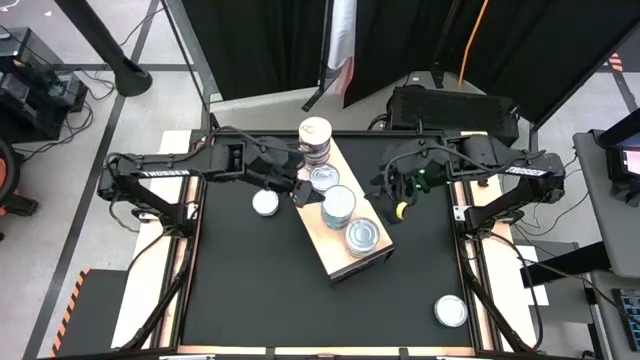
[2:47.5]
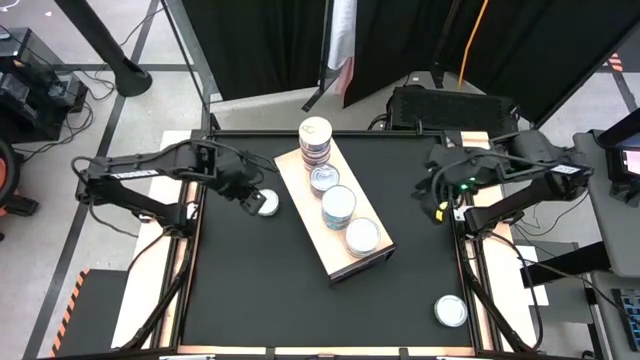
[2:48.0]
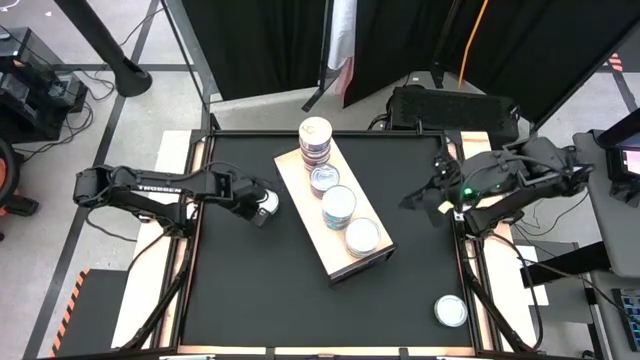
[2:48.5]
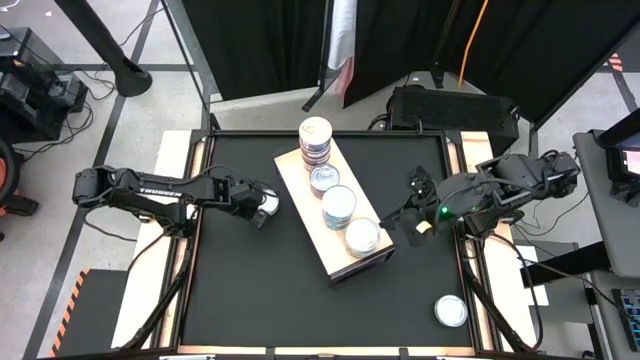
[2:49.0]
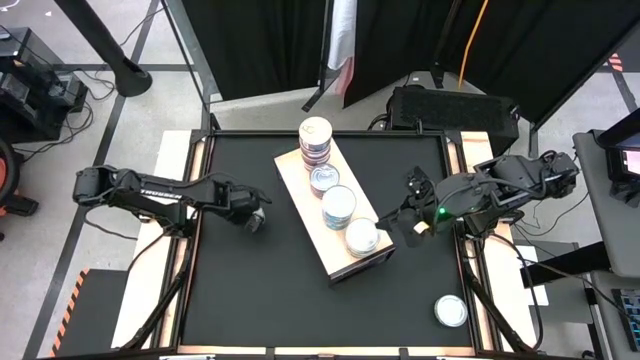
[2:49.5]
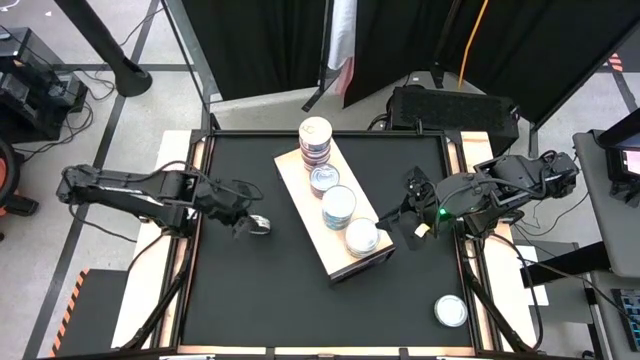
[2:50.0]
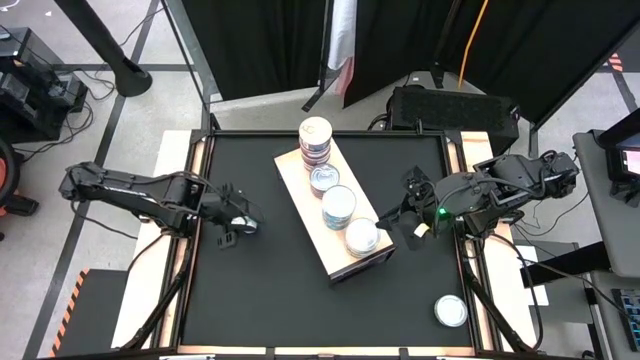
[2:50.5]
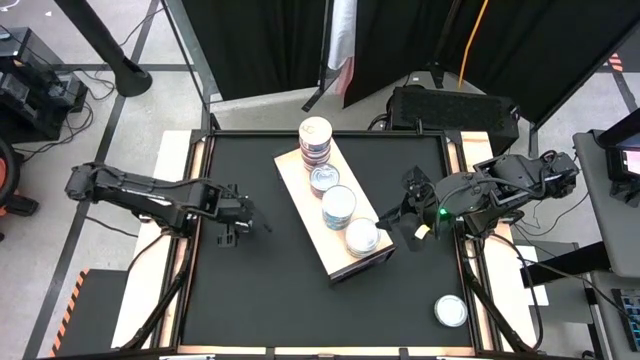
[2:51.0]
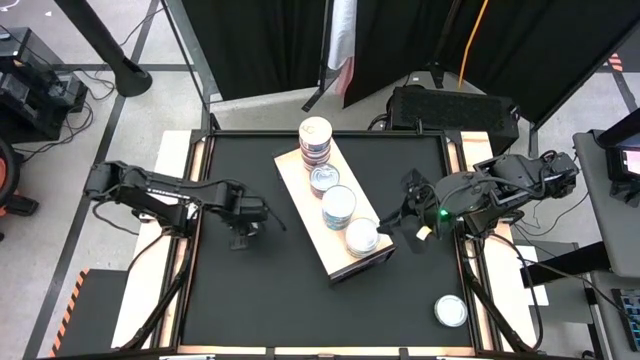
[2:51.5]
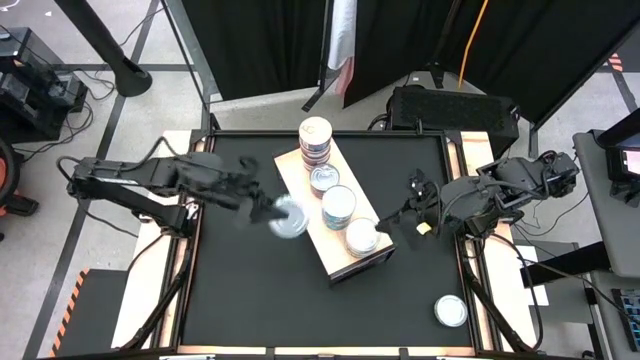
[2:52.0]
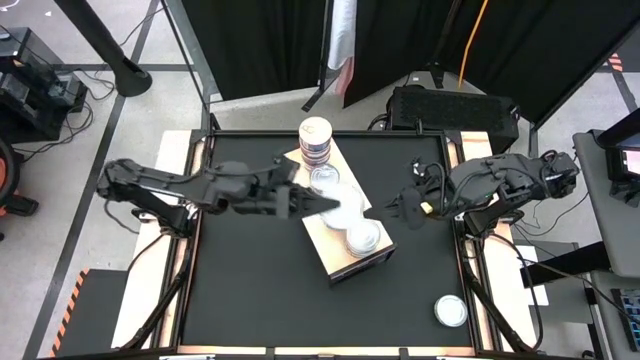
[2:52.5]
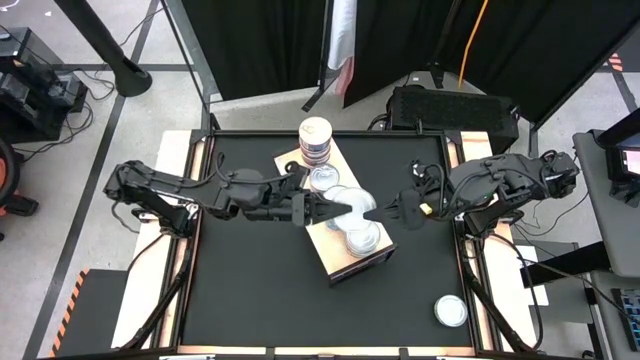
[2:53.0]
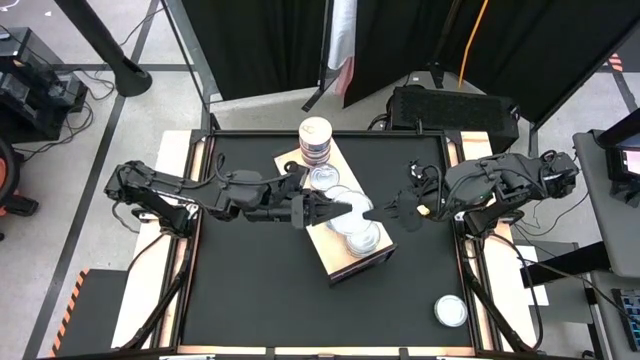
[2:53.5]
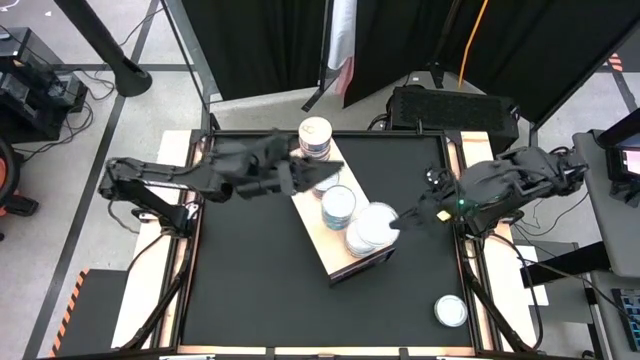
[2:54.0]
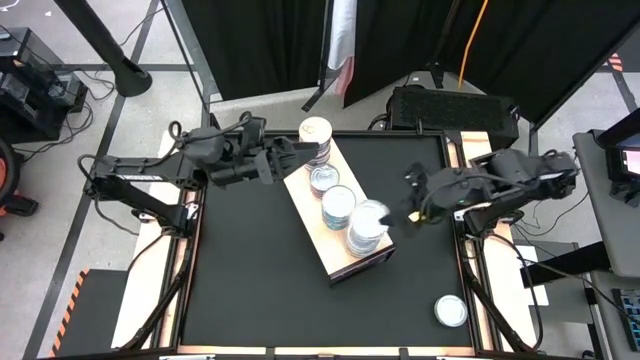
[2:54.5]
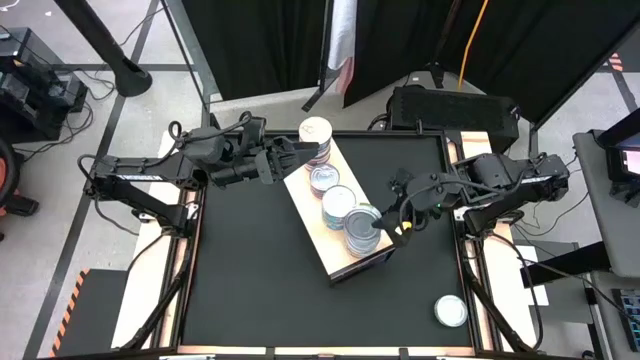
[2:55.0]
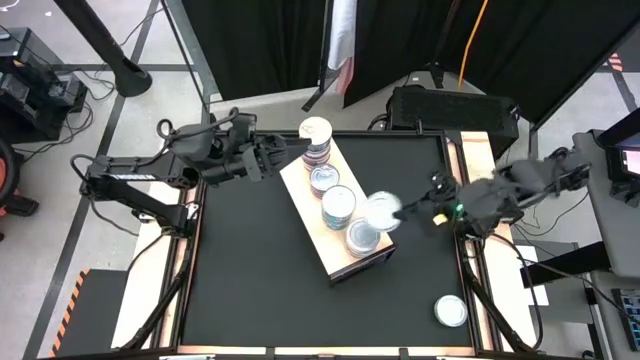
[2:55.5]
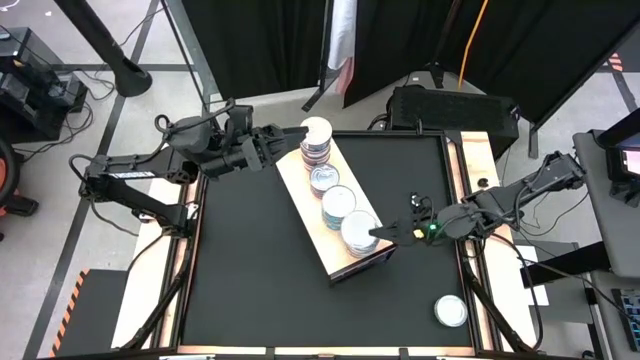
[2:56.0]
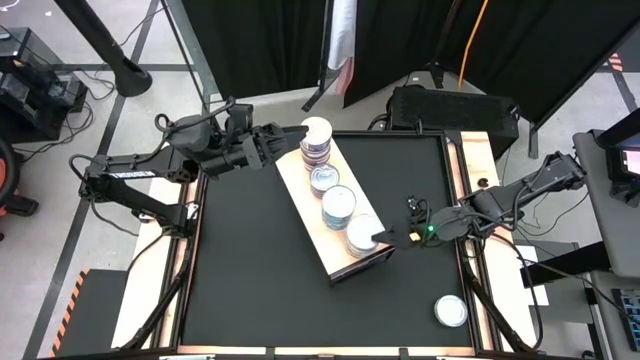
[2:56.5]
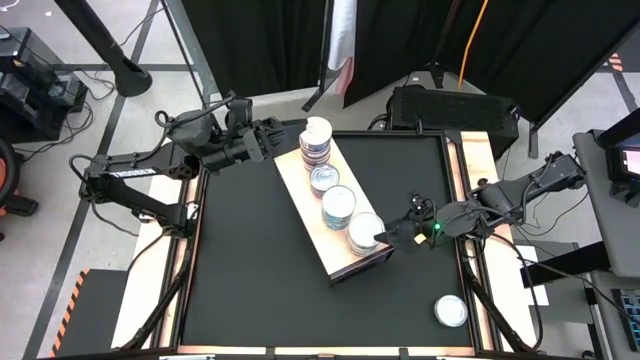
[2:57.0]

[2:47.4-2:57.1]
Task: Stack canned seafood by type on shelf
Stack the green tuna can on top of the stacked green tuna can on the shelf

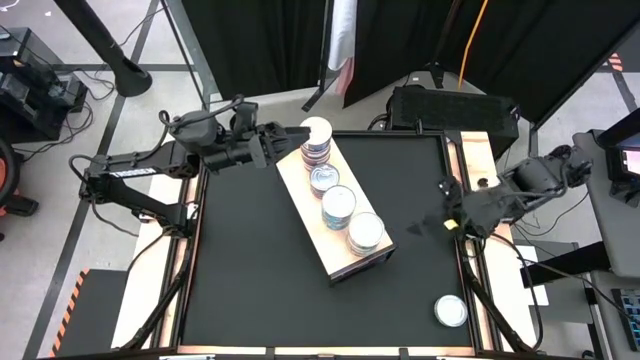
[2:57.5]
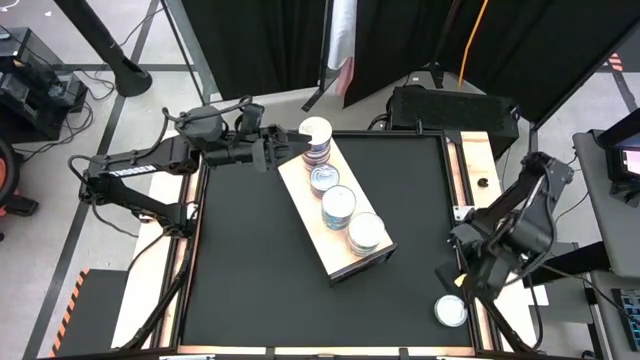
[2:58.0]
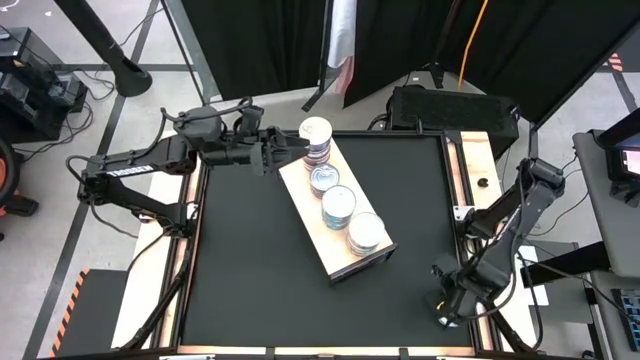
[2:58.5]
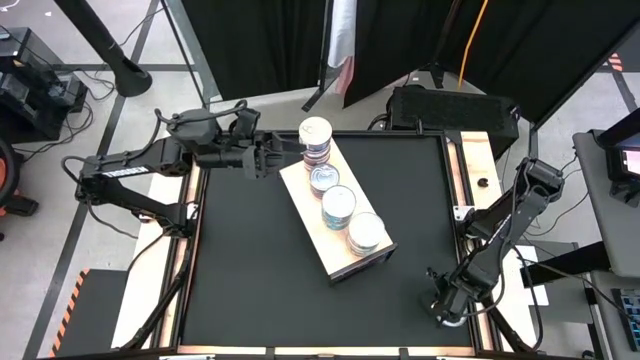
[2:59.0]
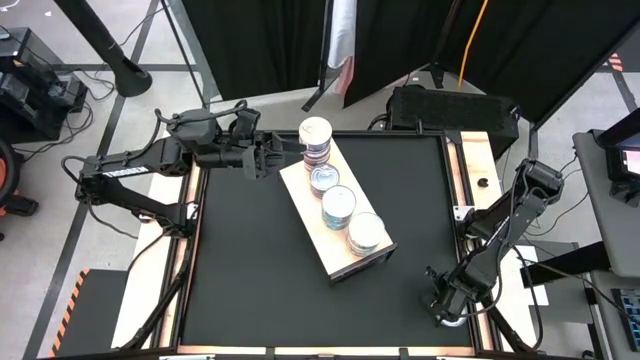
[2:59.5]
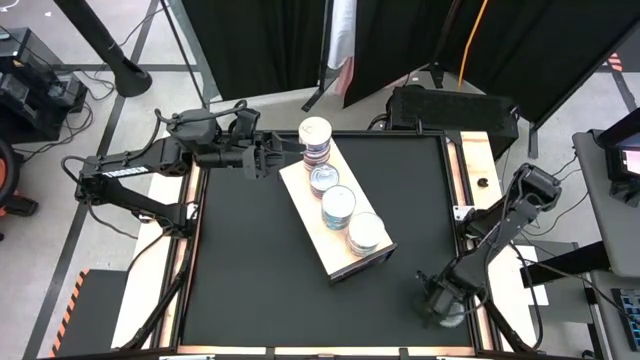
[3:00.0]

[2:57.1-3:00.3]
Stack the green tuna can on top of the stacked green tuna can on the shelf

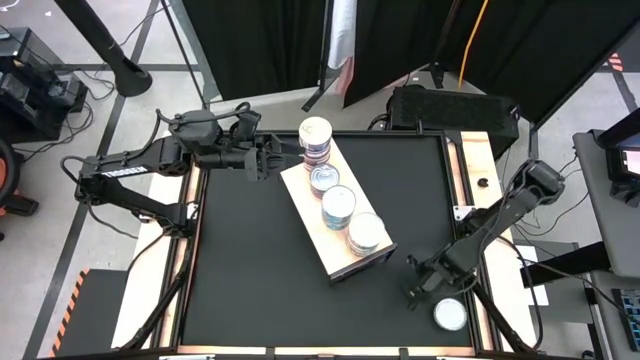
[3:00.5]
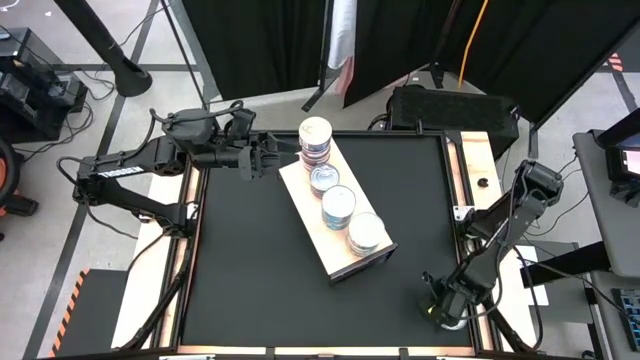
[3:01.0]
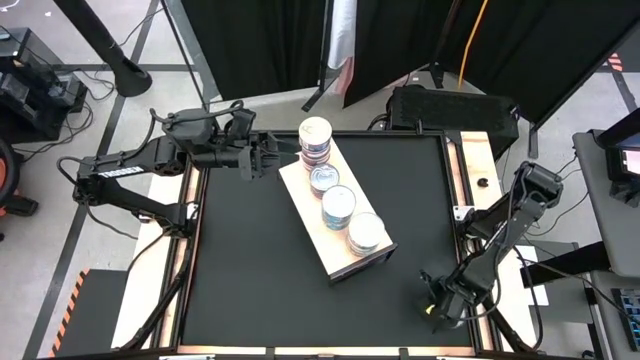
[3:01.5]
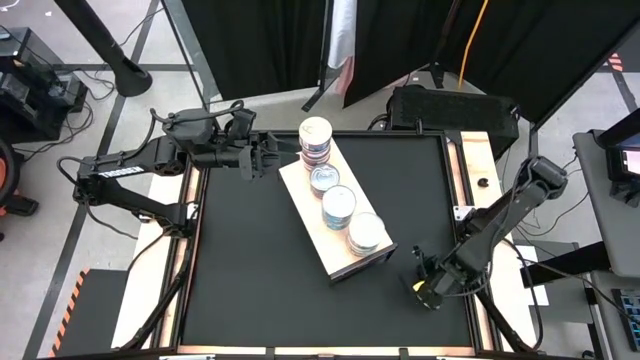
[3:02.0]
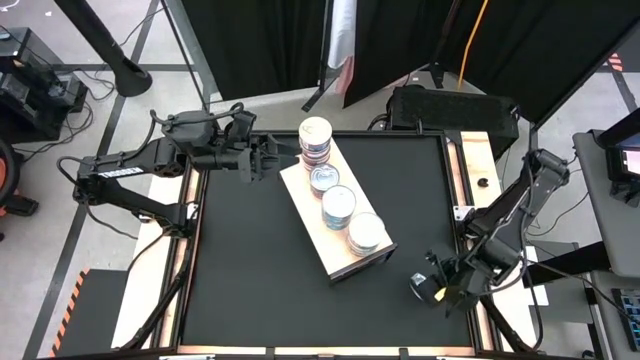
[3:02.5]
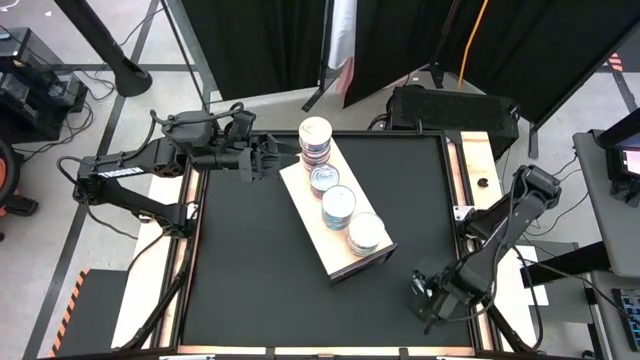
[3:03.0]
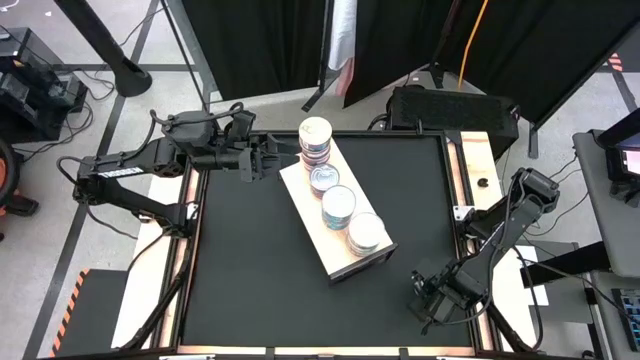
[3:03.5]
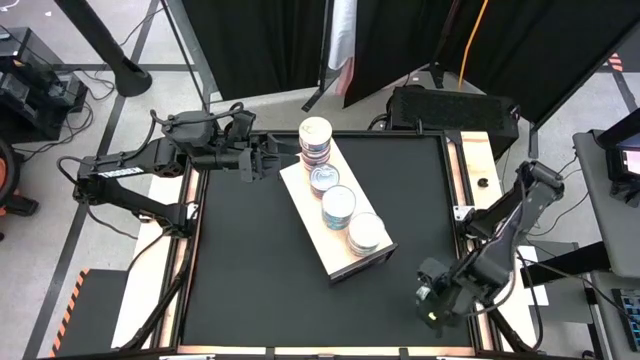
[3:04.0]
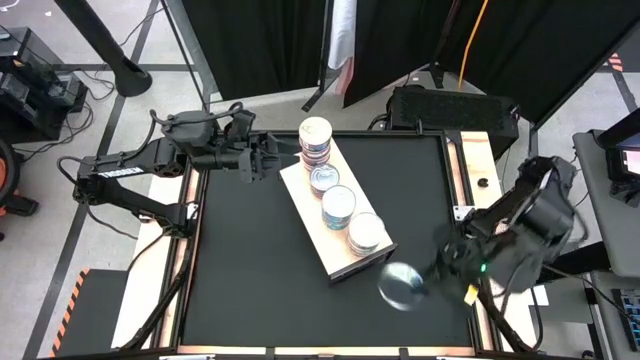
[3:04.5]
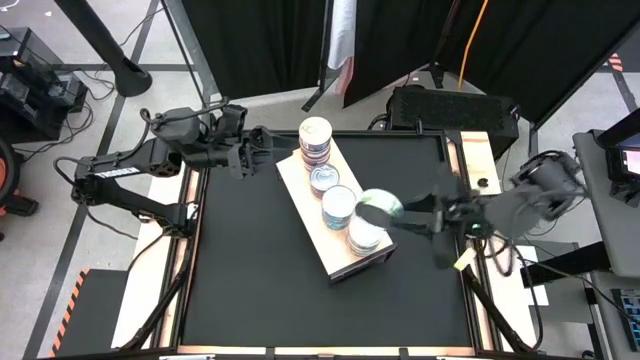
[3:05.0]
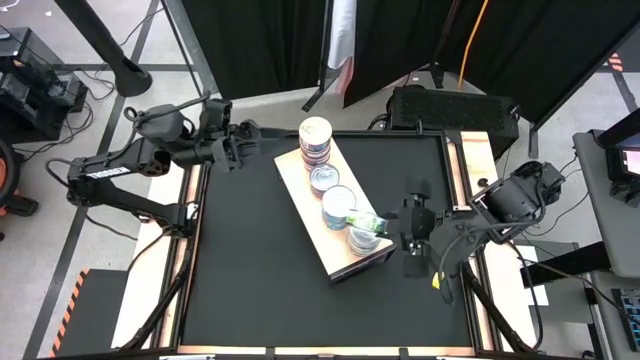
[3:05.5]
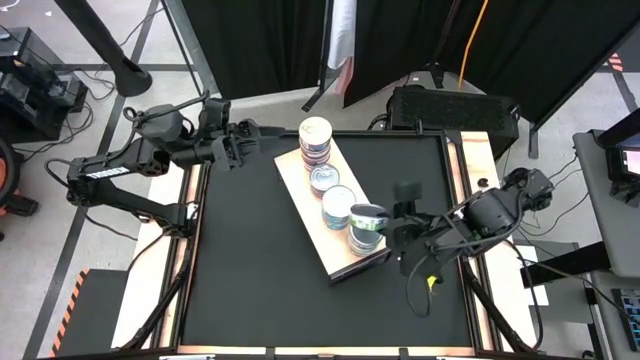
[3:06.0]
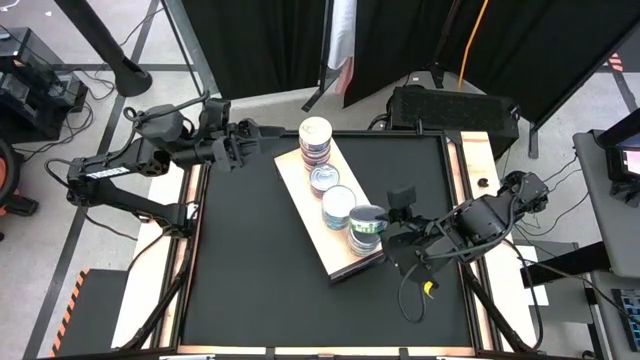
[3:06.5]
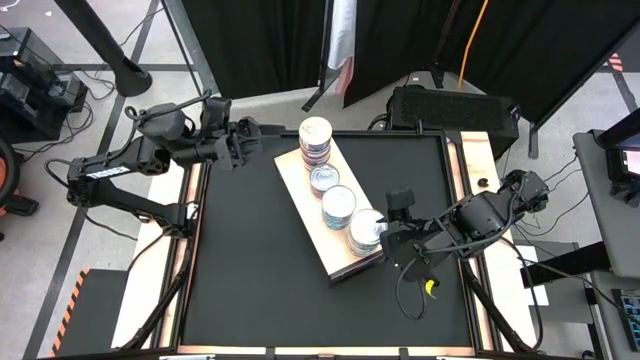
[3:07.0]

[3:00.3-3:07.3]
Stack the green tuna can on top of the stacked green tuna can on the shelf

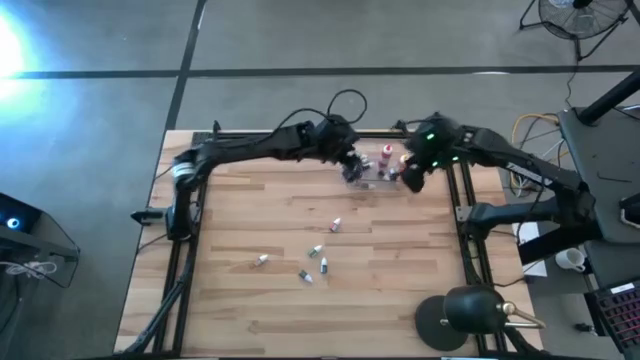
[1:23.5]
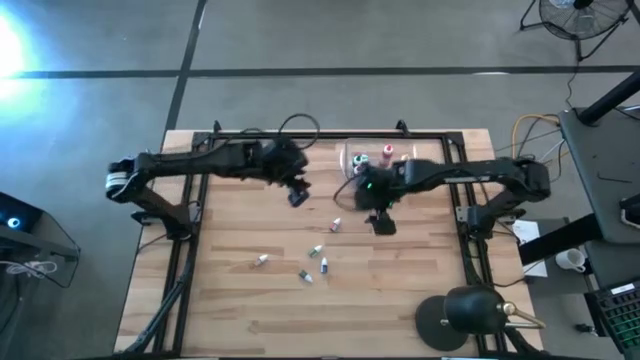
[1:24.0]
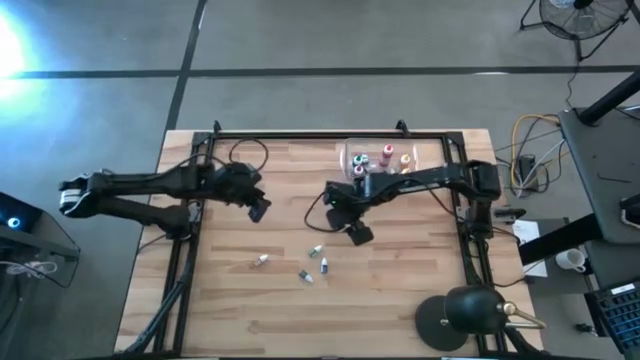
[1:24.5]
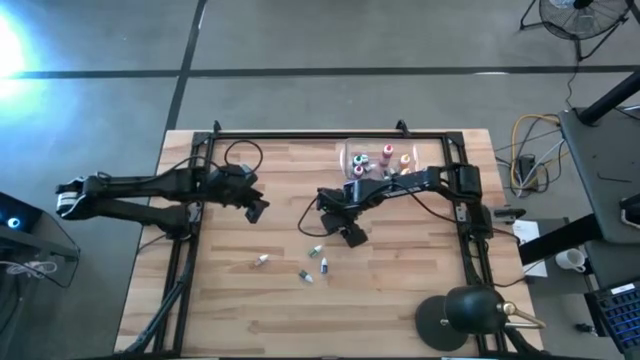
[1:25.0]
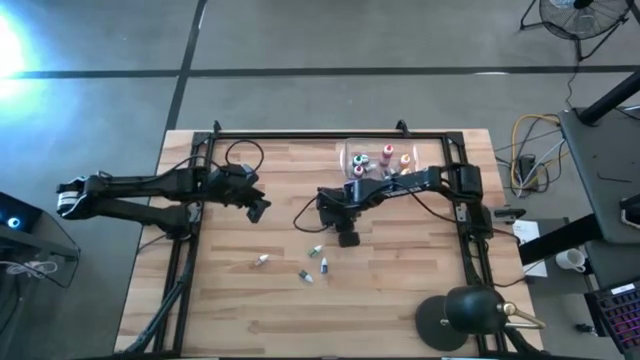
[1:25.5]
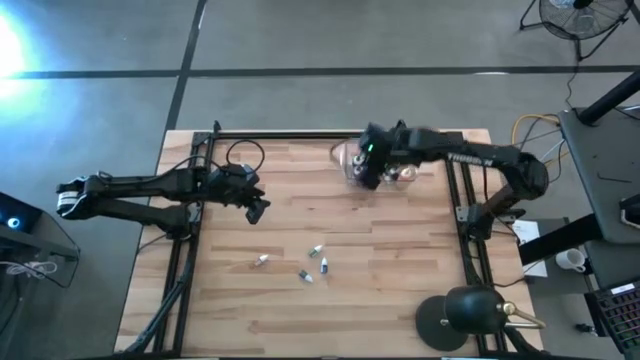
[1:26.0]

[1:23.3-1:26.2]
Task: Pick & Place food coloring
Put the small red food coloring bottle into the transparent bin
